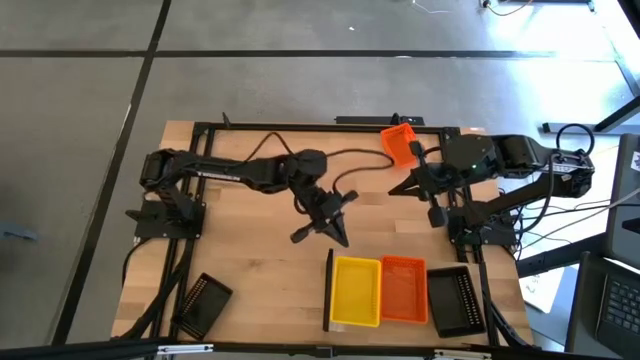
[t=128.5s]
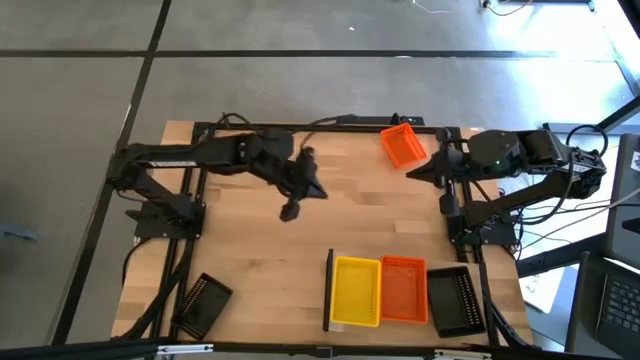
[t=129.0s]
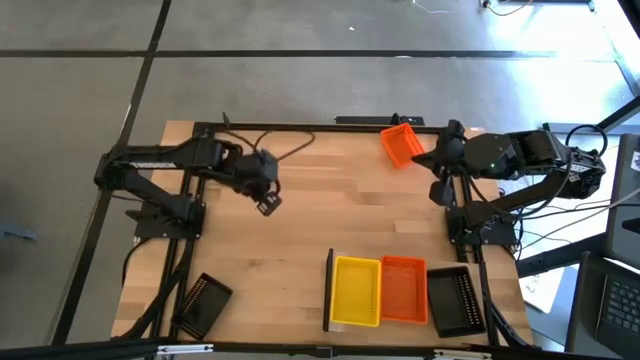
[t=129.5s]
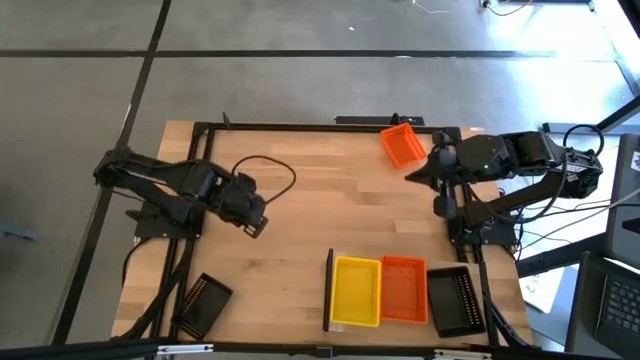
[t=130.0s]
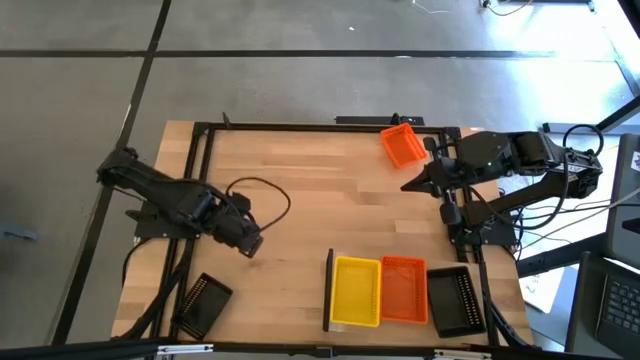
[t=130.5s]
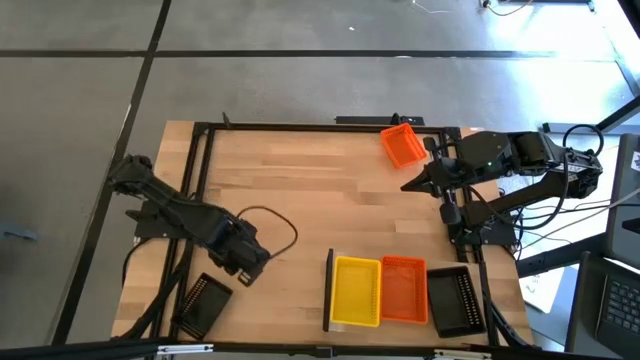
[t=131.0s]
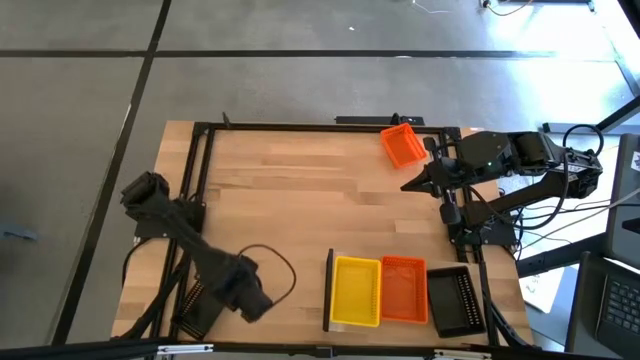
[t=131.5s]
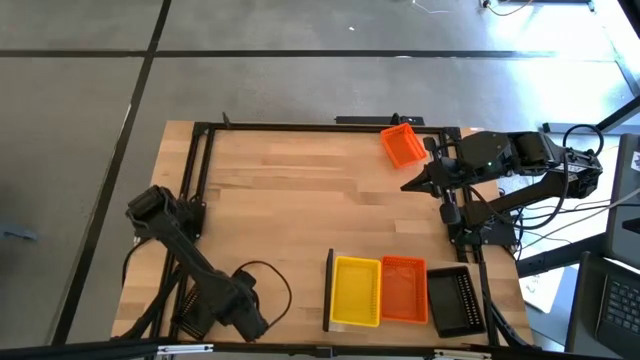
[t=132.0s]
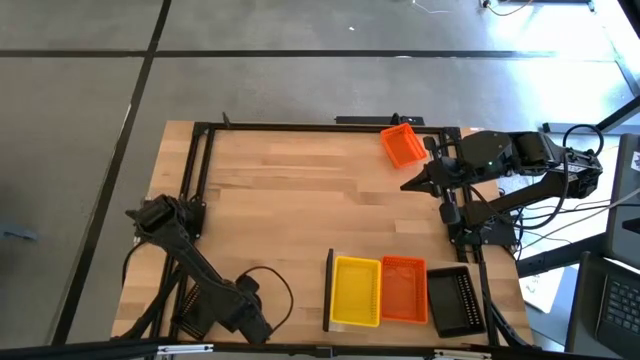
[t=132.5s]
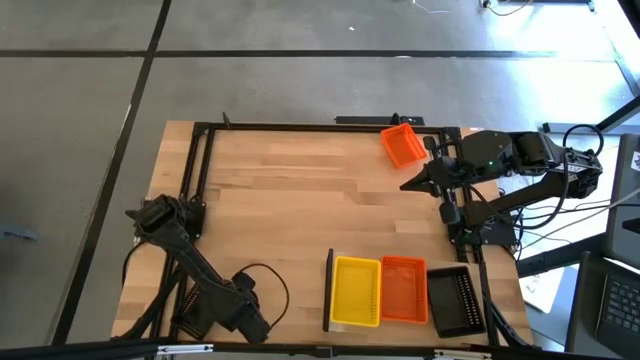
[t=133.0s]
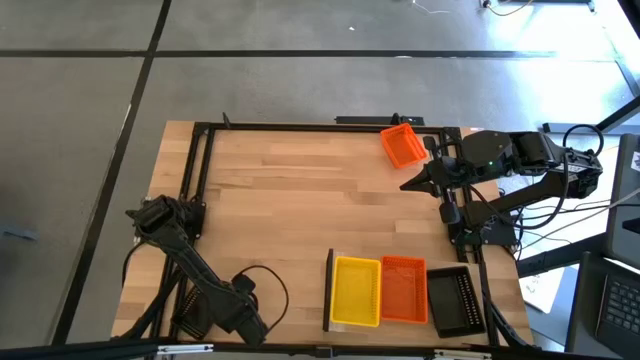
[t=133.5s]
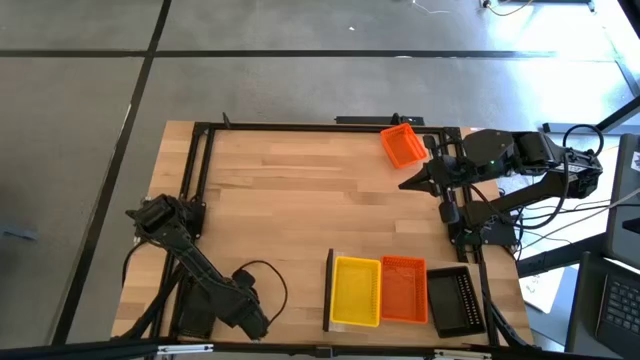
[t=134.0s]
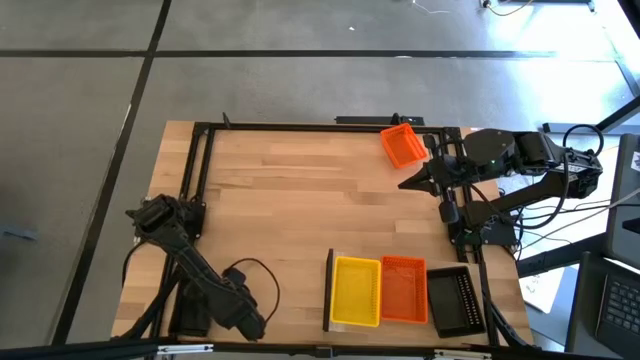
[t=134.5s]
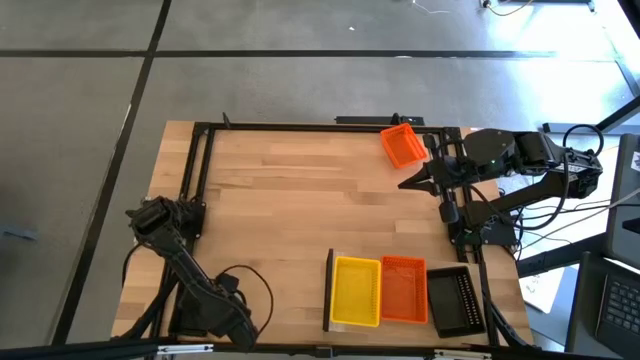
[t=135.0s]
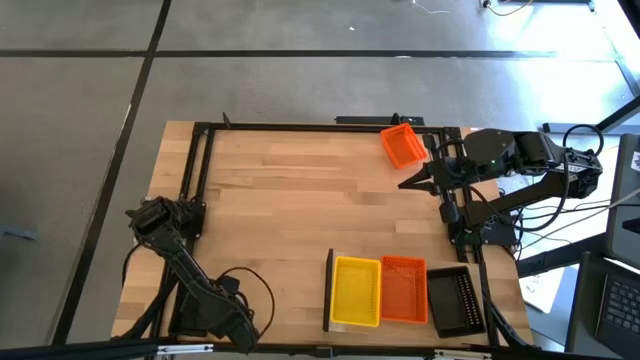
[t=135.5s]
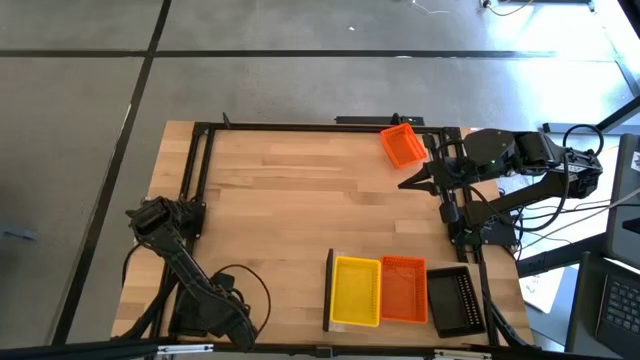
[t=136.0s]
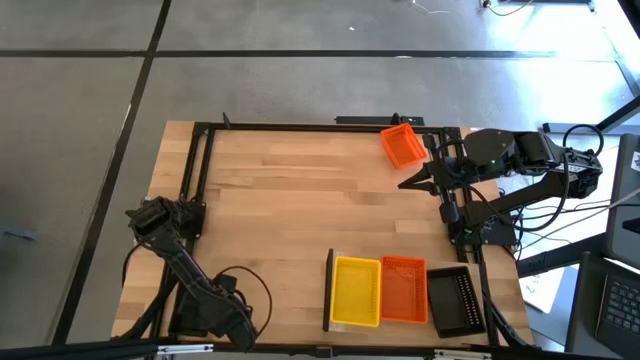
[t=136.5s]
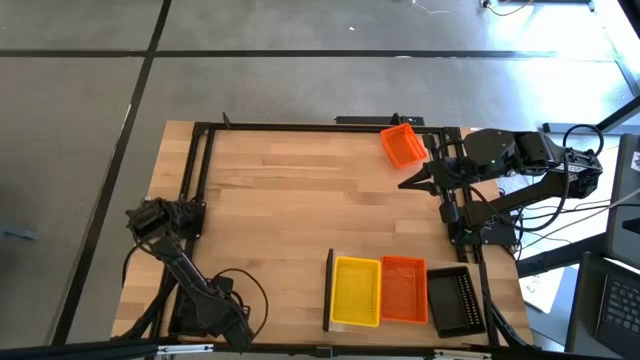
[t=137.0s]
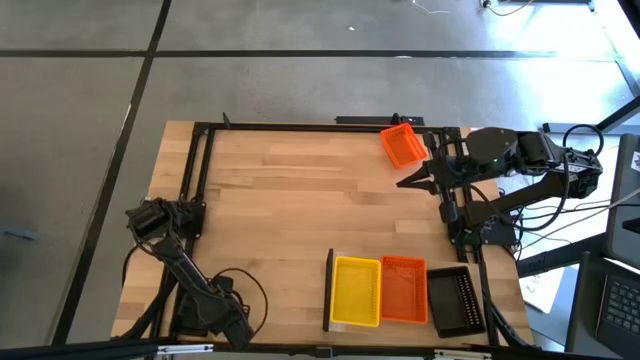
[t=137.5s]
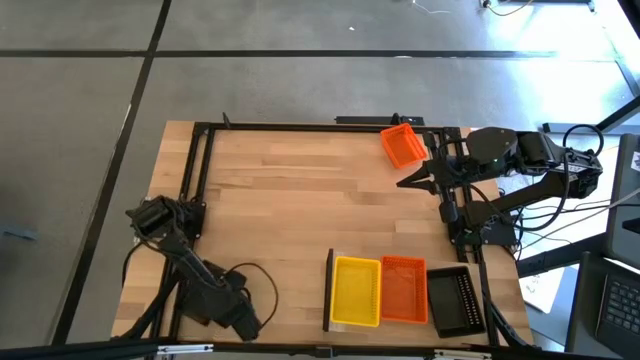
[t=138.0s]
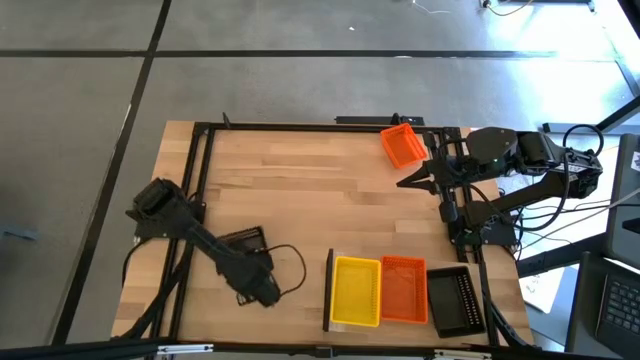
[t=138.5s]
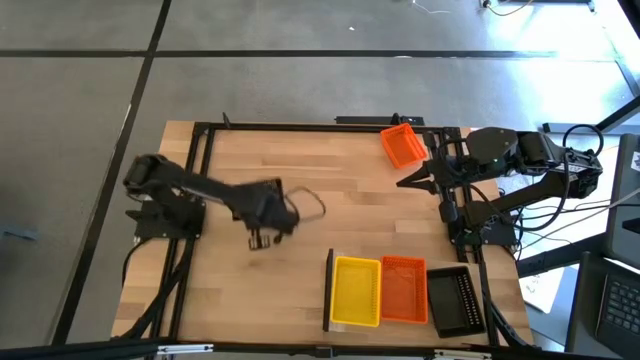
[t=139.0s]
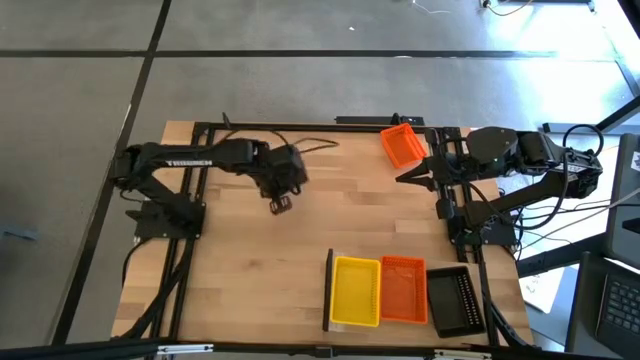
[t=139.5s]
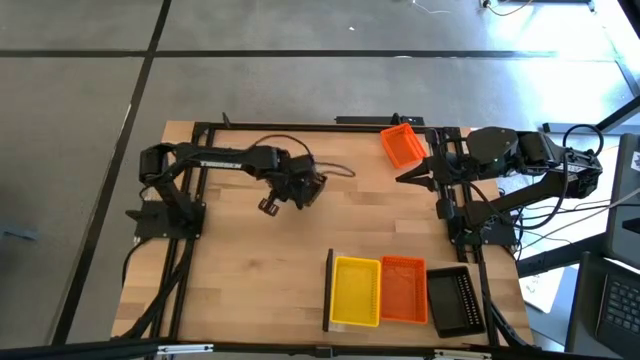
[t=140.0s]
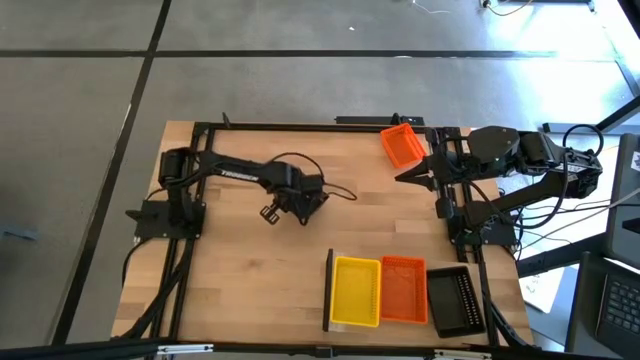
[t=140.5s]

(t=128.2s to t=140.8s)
Task: Stack baskets on shelf by color
Stack the black bin on top of the black bin

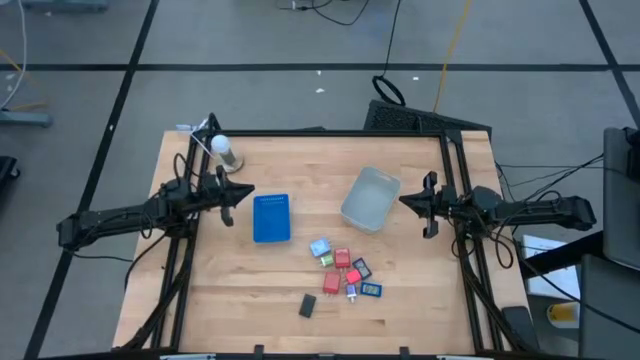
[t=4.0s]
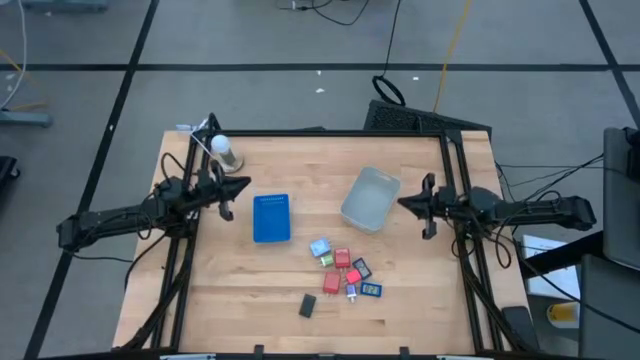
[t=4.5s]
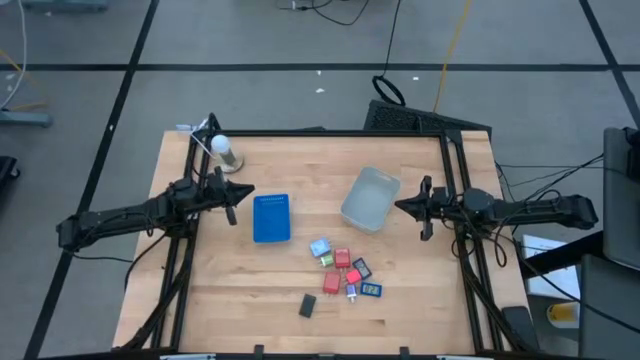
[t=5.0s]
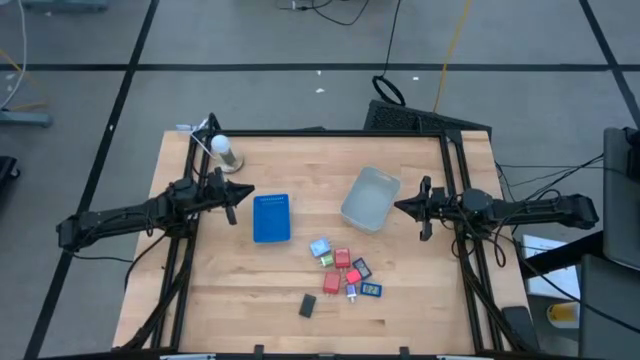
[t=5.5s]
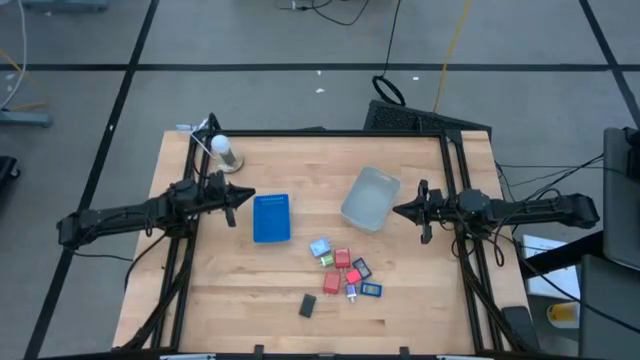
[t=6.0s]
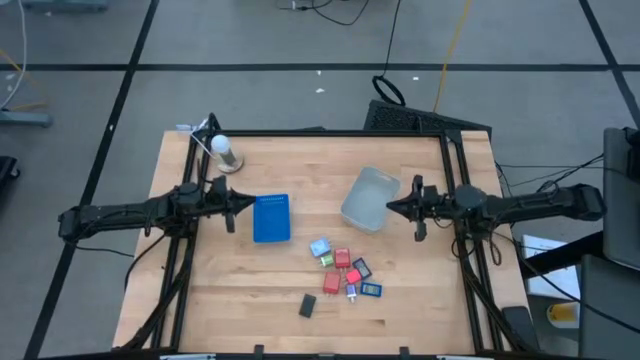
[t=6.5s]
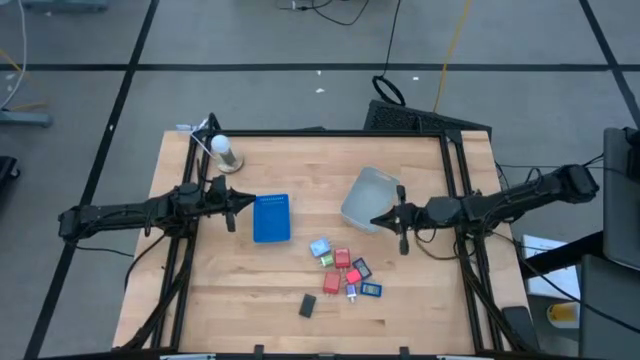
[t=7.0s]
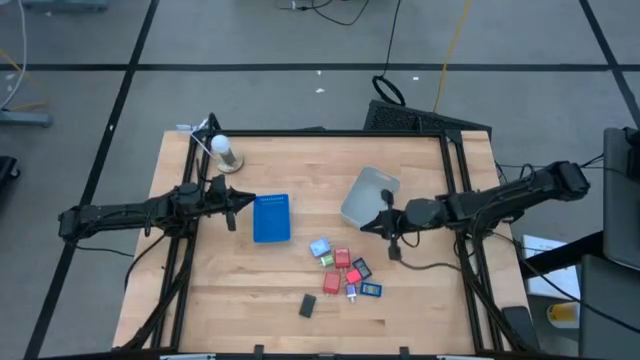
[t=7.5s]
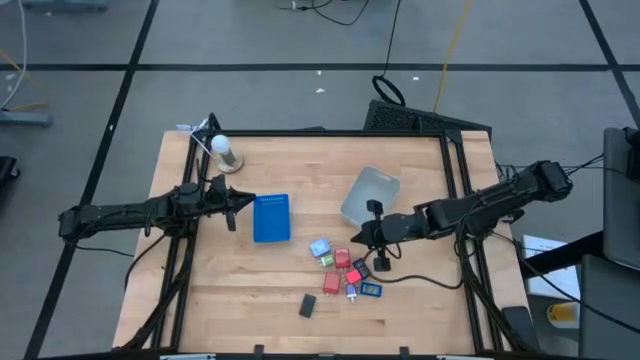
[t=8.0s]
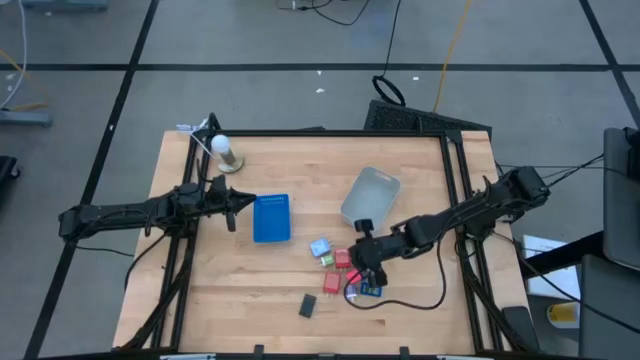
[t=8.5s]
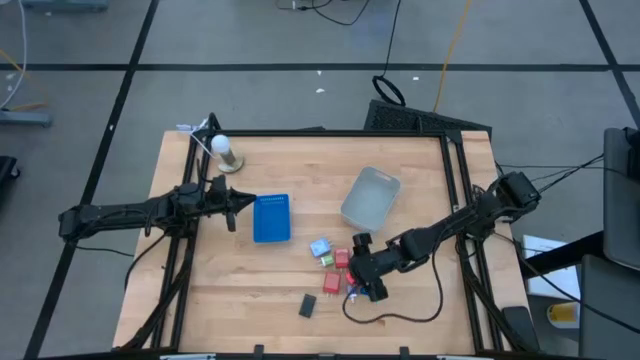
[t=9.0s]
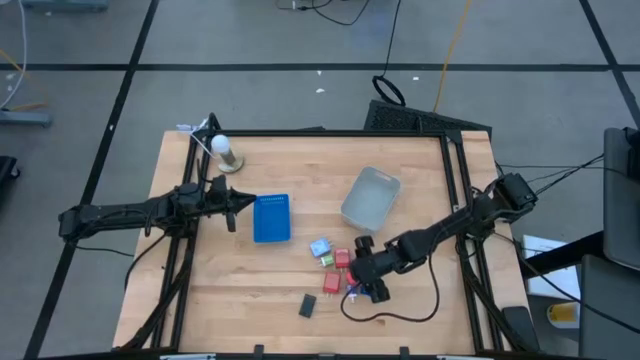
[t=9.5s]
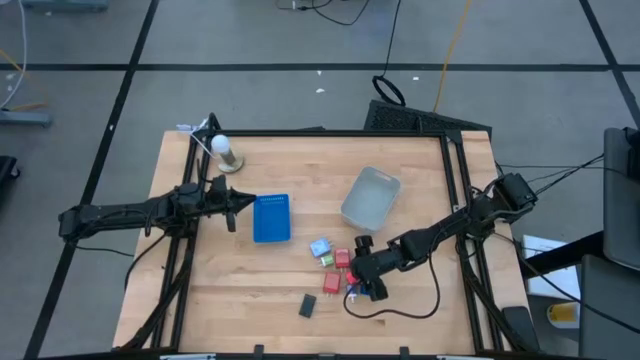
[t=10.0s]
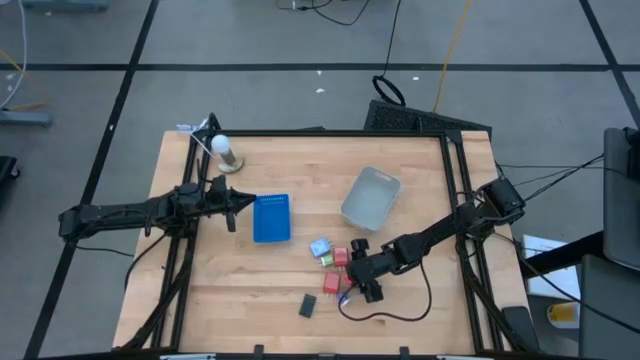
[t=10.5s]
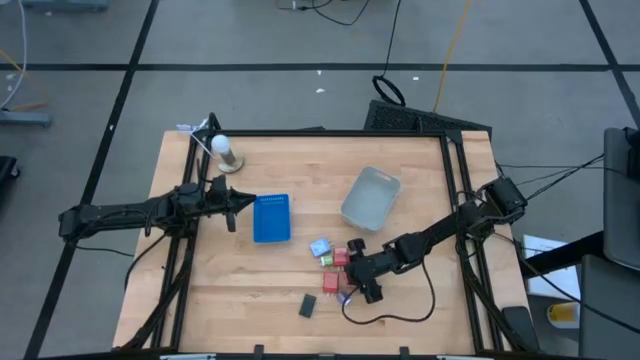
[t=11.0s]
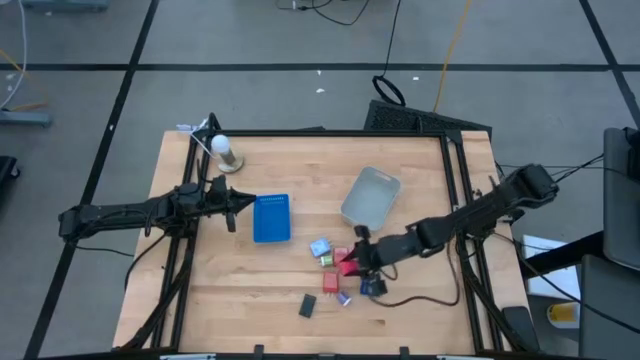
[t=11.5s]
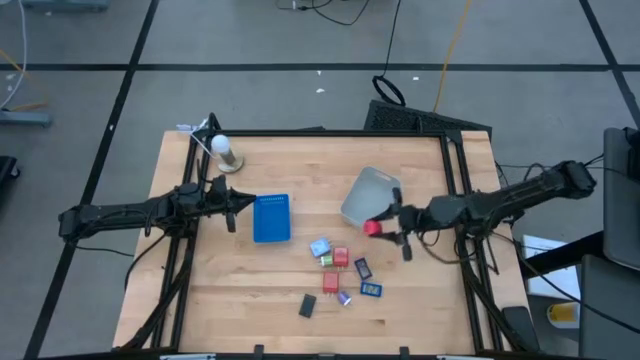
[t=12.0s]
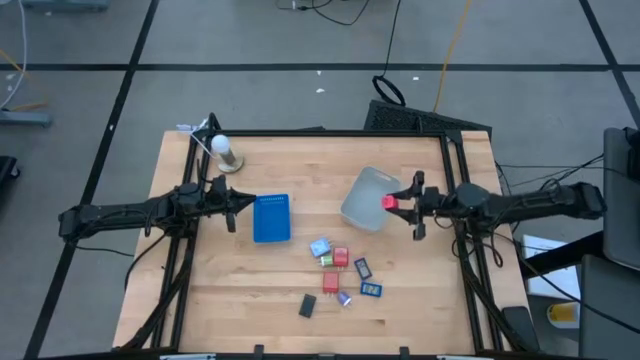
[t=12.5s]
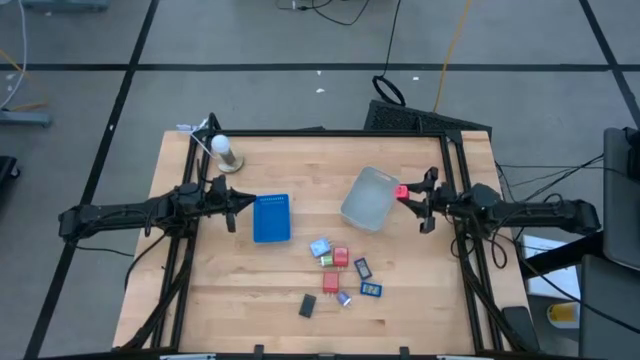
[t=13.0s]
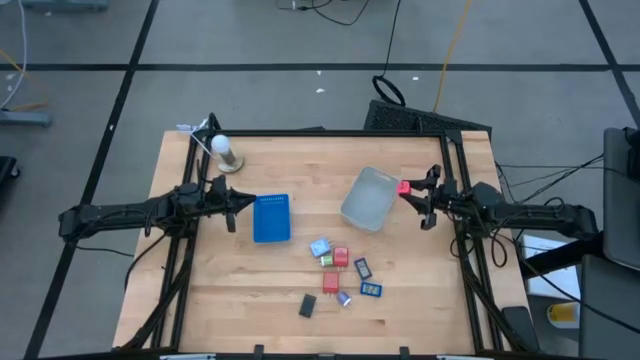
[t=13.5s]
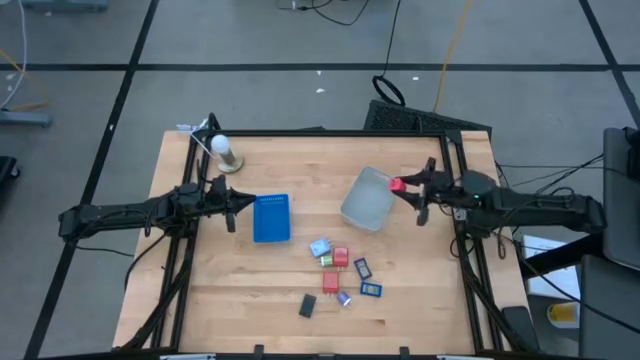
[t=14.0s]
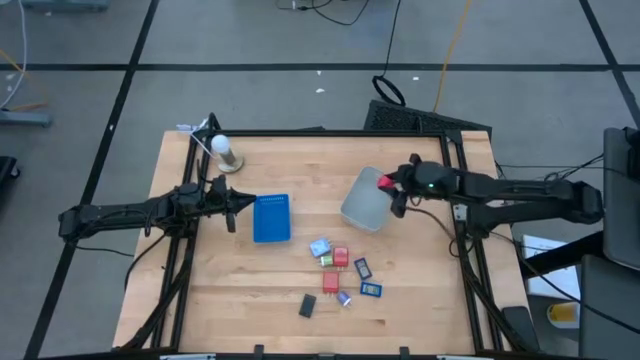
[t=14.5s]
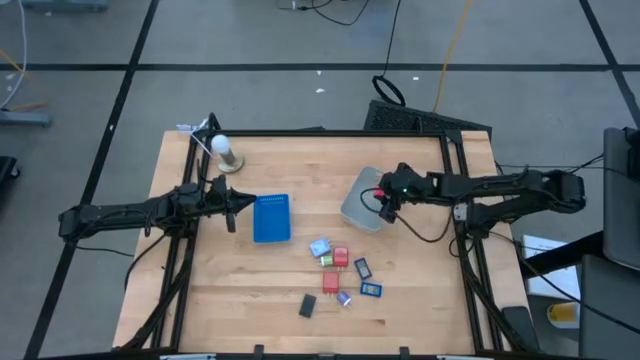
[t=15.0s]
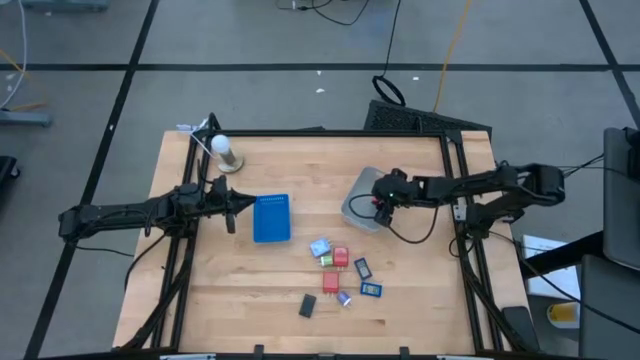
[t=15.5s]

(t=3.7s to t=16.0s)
Task: Pick & Place Office items
Put the pink charger adapter into the gray bin
